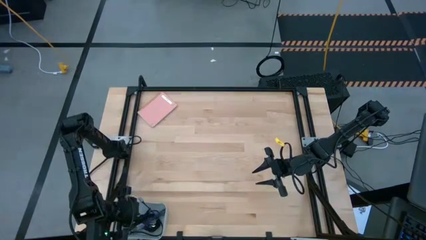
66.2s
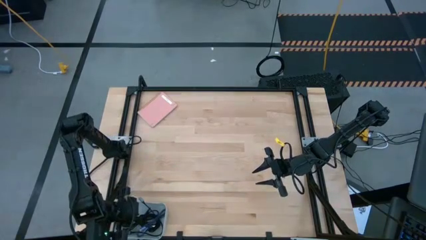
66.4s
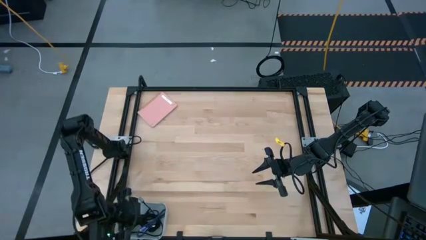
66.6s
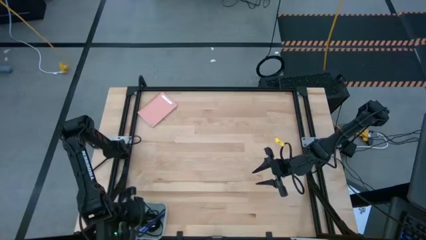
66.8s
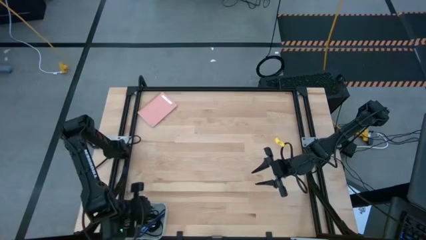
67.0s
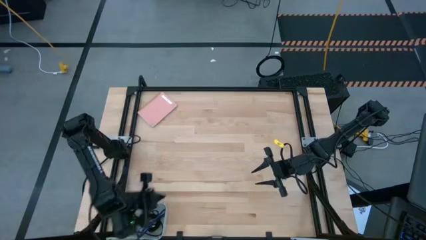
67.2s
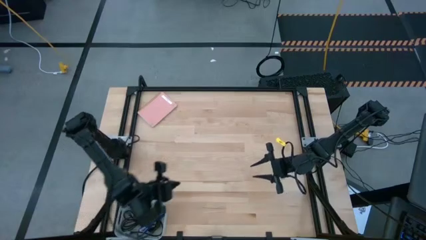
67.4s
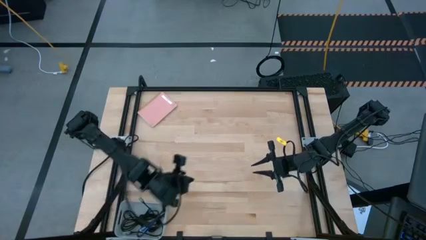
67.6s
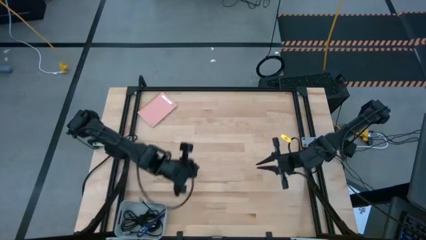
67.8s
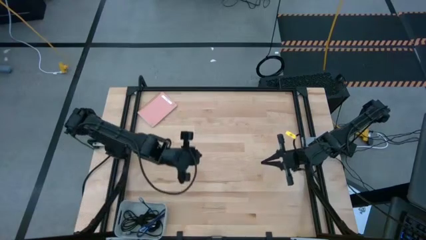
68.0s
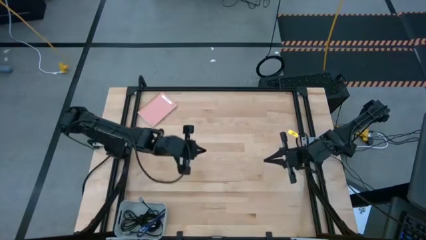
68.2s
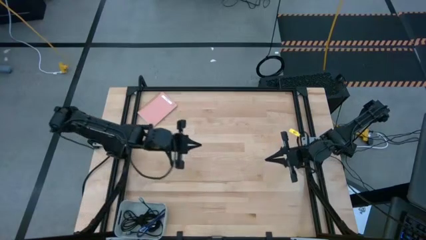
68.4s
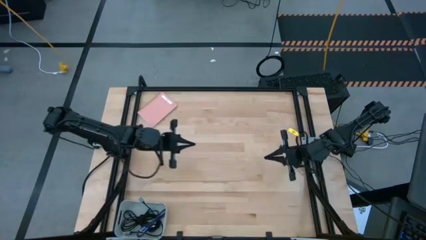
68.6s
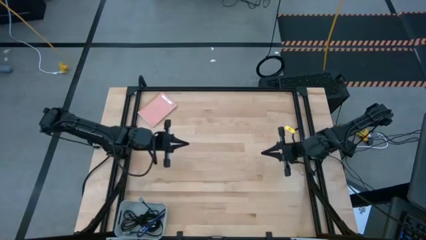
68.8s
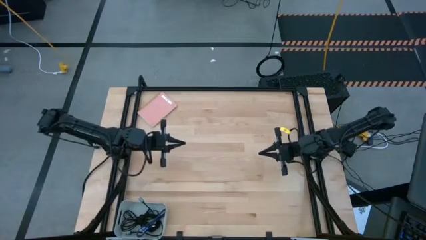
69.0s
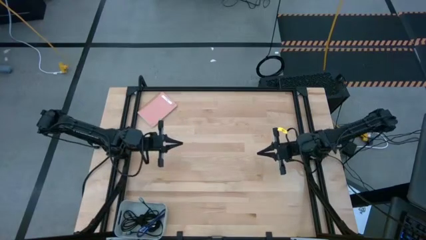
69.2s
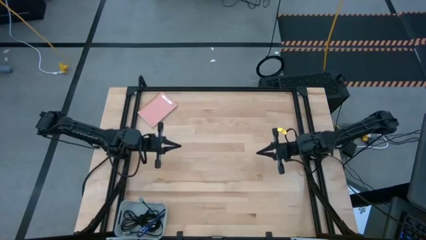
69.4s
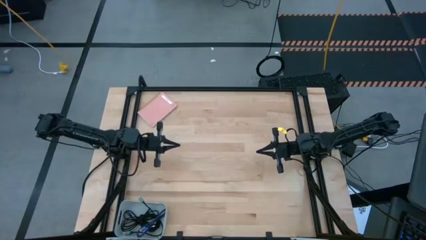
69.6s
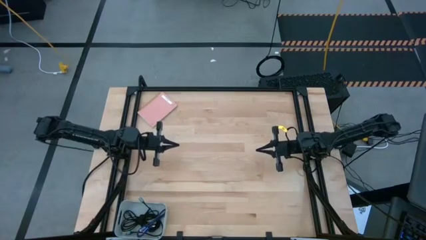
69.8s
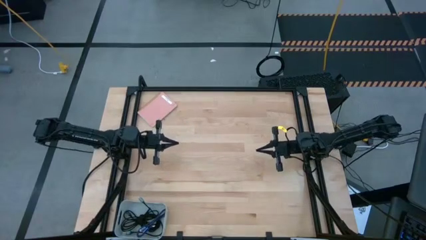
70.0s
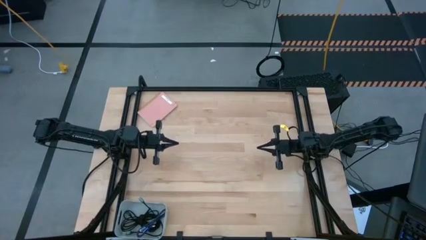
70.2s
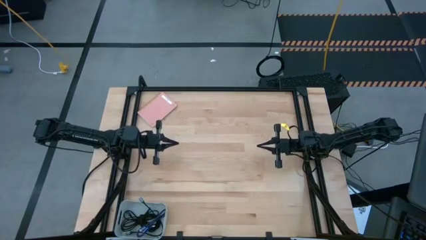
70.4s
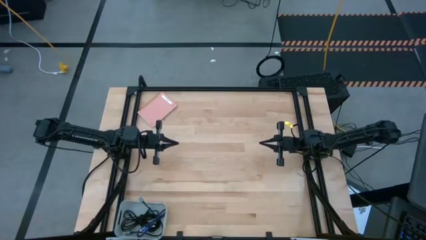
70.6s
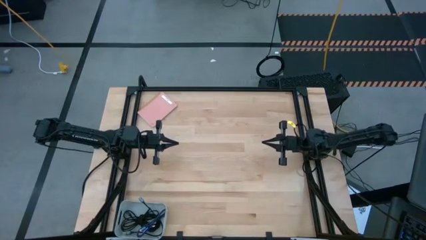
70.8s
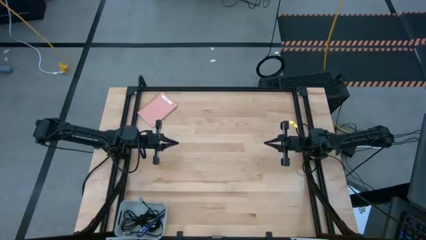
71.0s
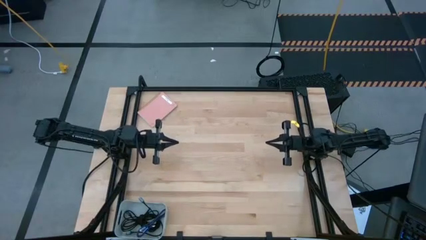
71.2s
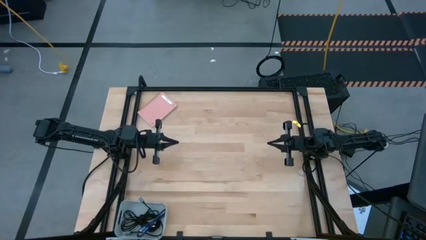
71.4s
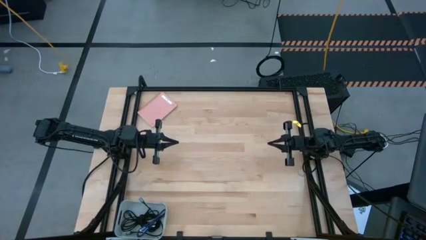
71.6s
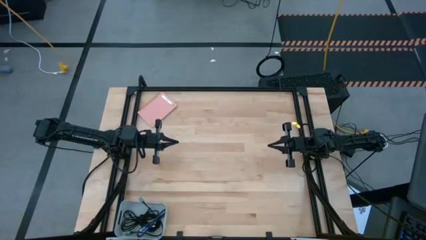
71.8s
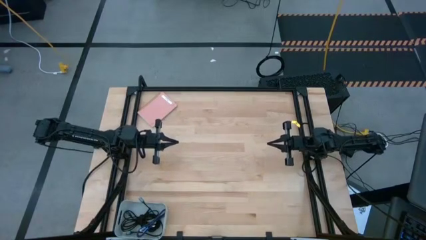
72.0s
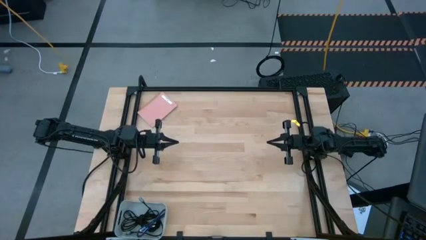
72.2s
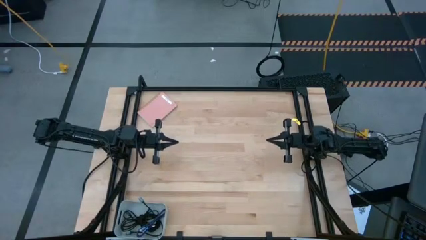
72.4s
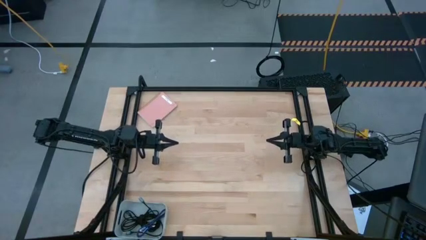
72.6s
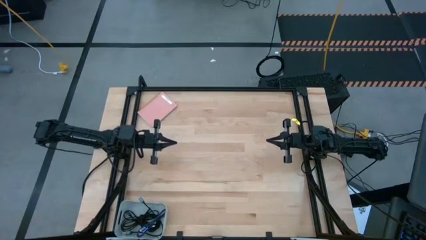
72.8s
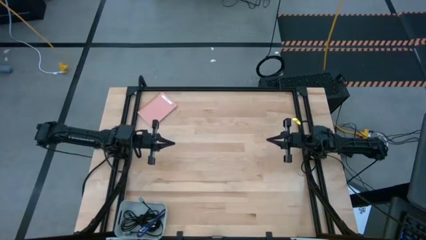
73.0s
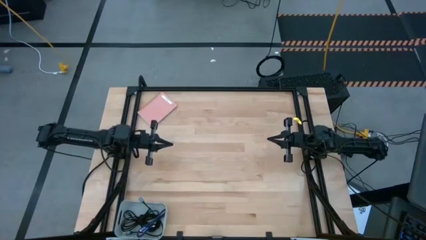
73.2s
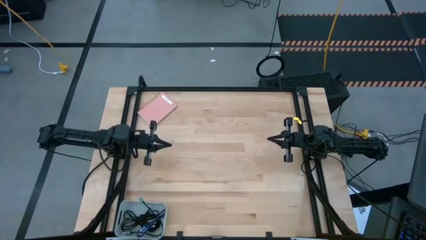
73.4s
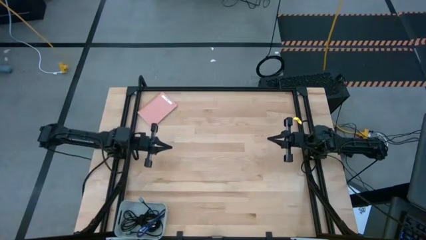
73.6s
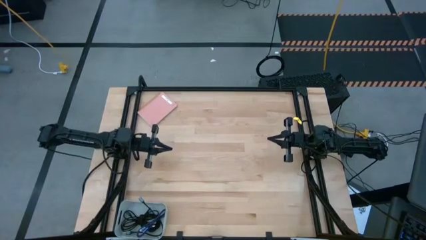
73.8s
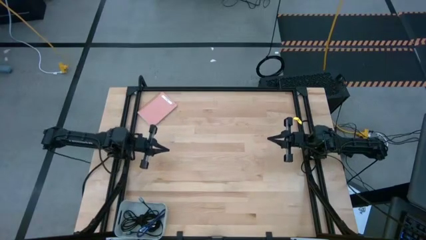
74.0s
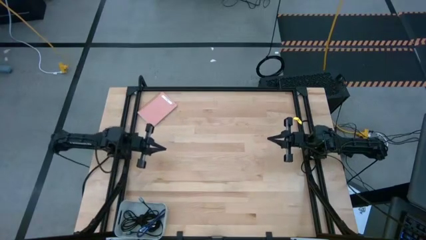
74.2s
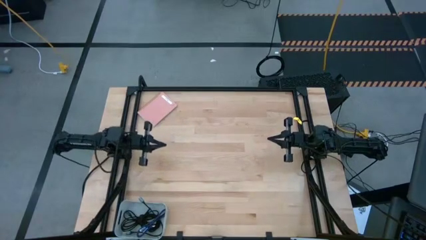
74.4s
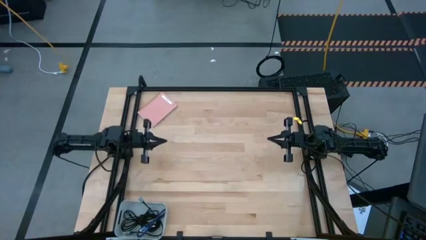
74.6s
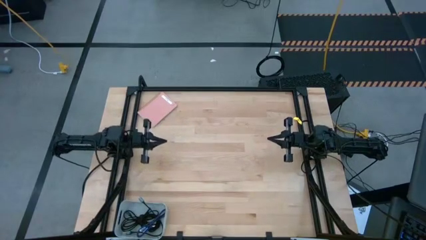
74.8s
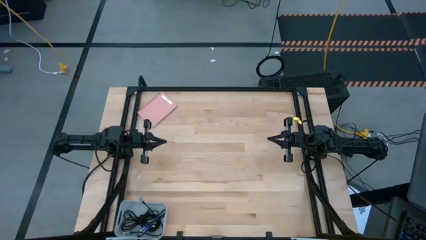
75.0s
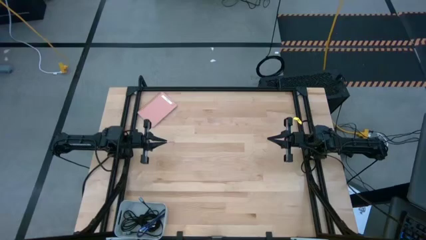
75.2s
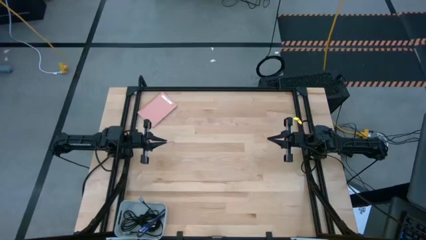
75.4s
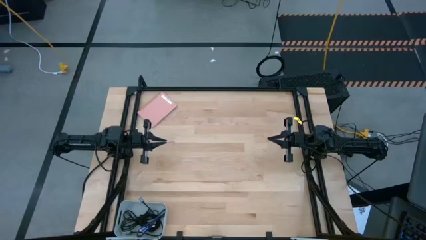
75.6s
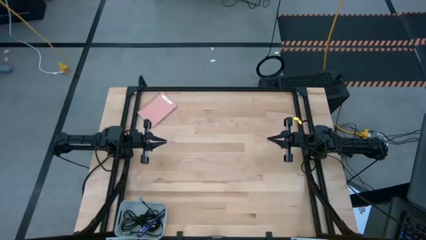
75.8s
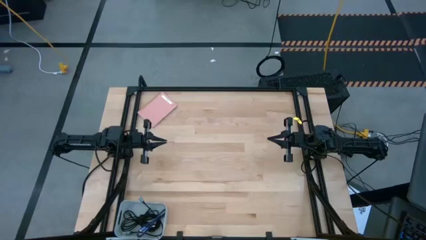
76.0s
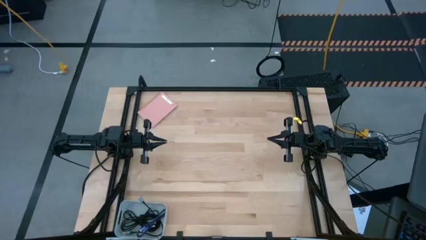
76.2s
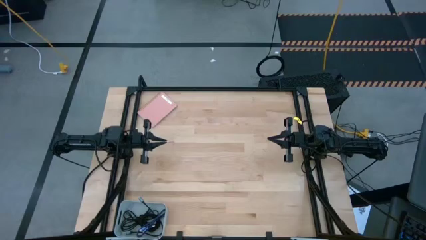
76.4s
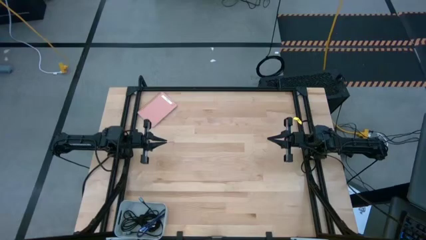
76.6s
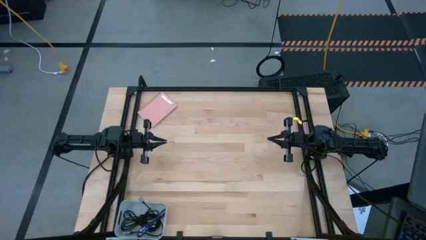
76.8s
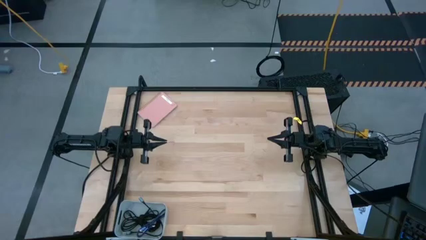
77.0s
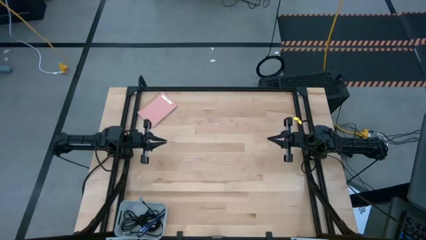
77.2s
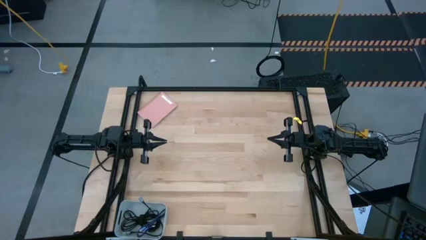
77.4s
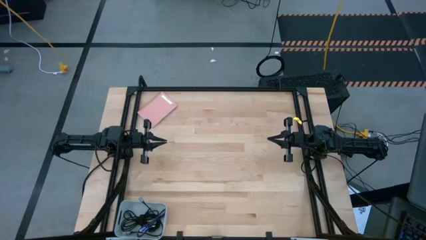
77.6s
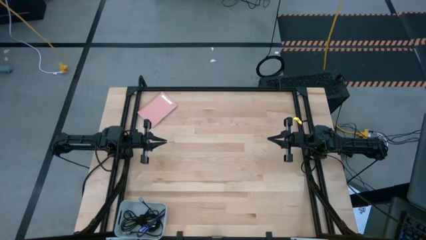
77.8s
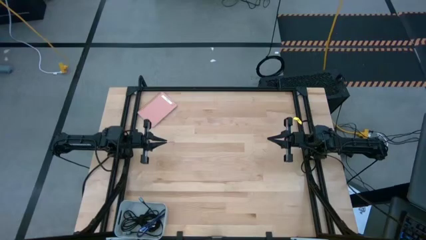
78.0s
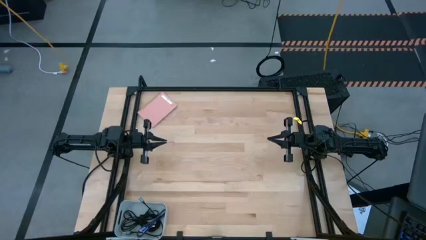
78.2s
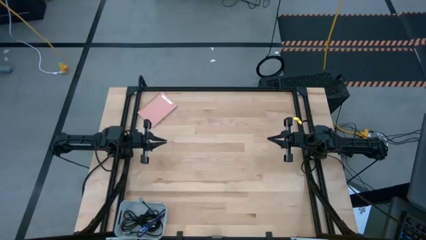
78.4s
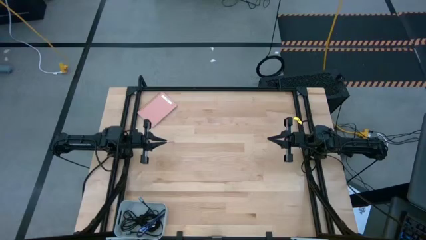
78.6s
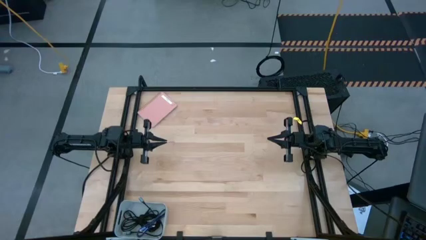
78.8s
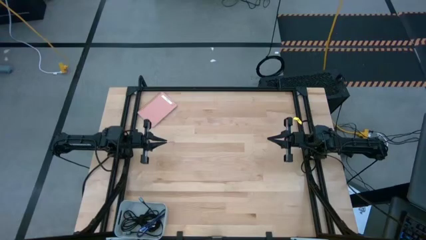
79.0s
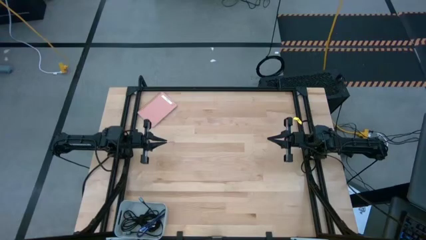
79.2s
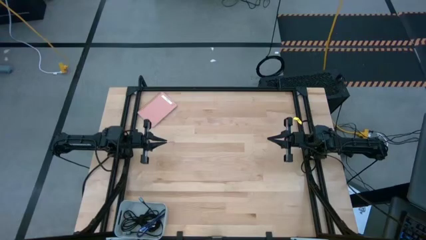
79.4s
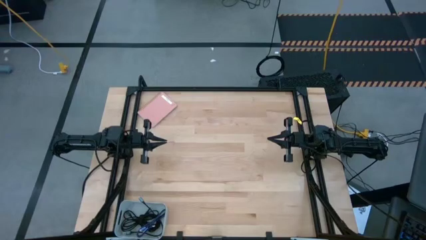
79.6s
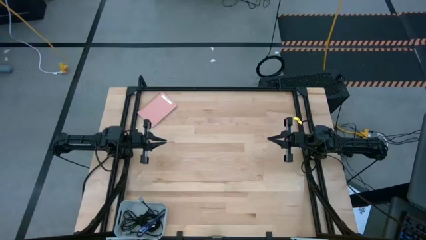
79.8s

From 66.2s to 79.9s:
Task: Pick and place USB-C Cables
Return to Home Position

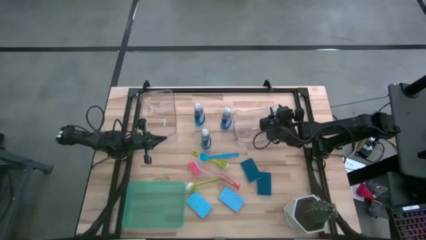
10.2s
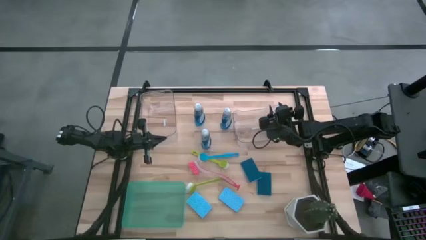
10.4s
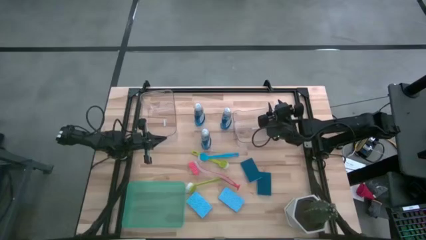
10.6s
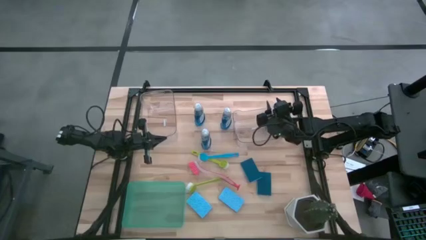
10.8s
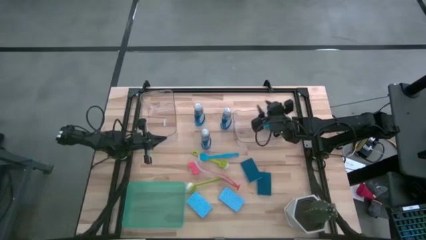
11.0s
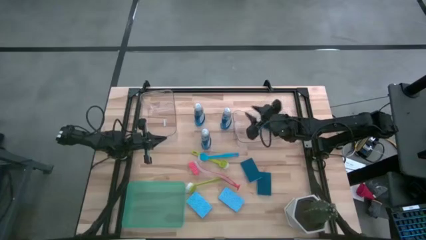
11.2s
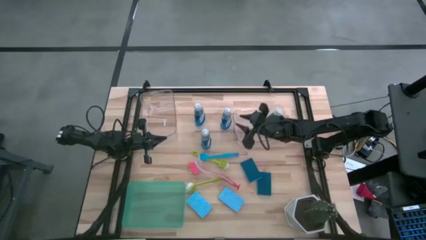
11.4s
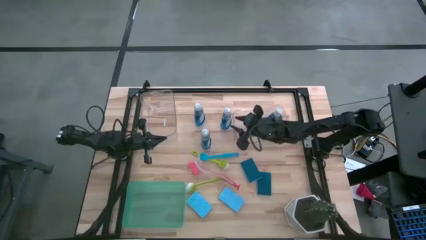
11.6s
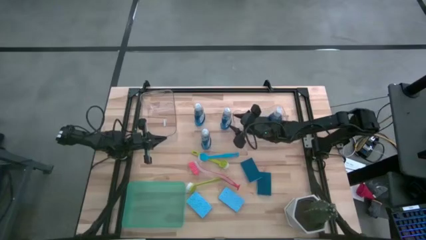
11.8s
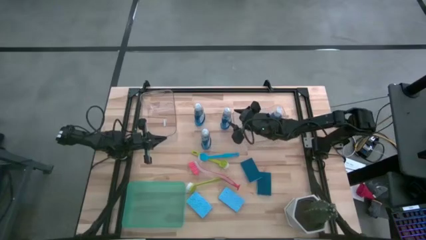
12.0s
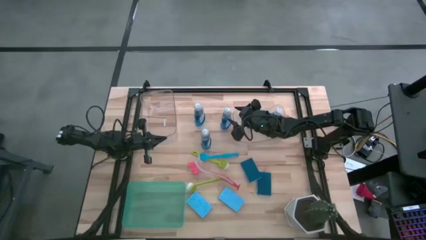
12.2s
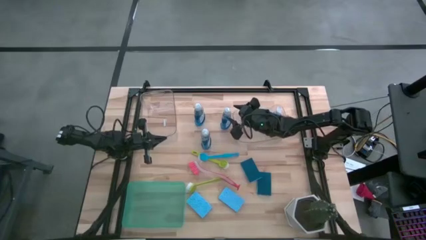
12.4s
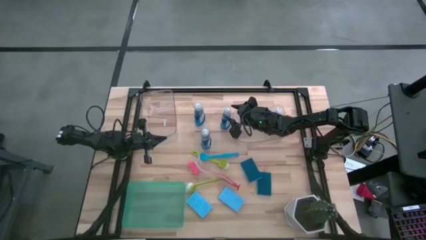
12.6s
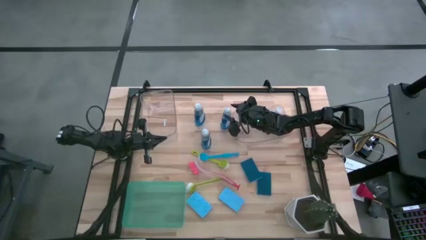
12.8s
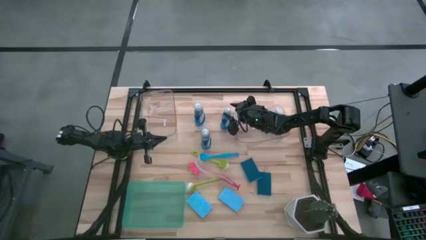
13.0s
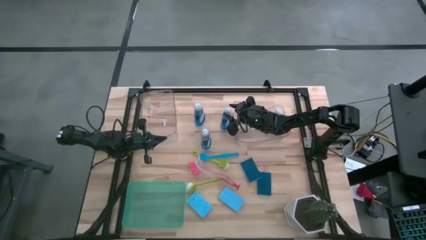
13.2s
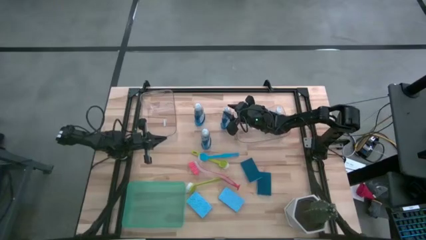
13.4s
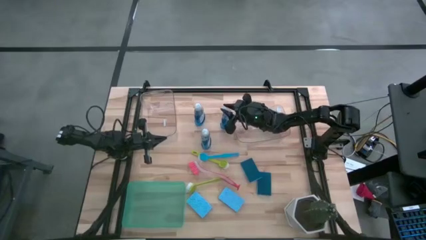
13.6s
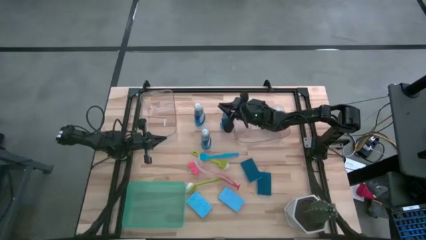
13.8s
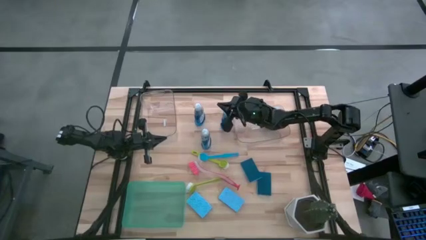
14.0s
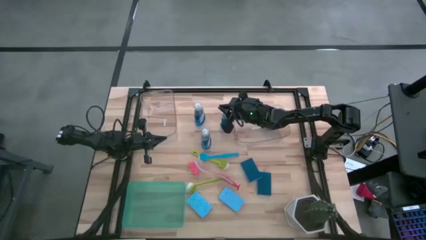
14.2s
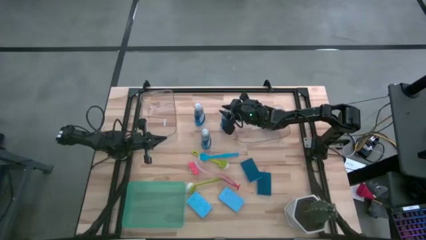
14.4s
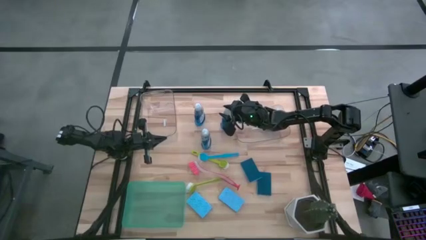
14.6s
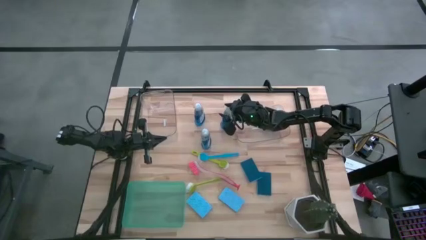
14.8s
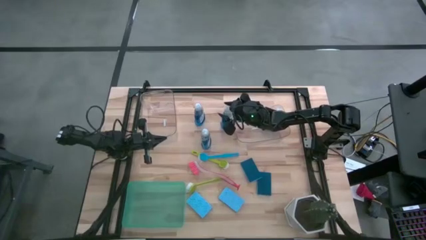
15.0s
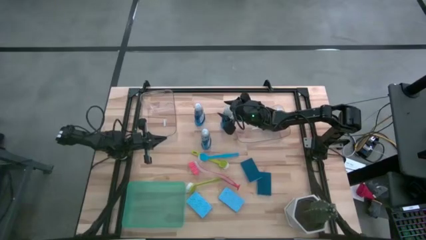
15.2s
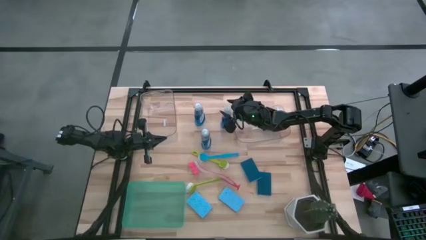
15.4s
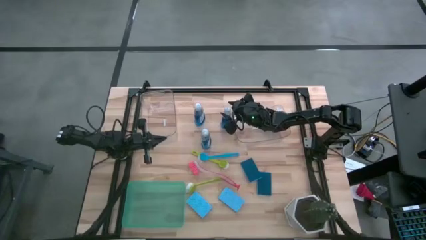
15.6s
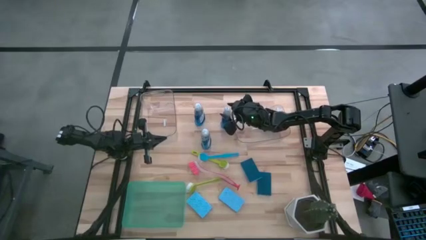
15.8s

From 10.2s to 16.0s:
Task: Pick & Place Kitchen Sink Supplies
Put the soap dispenser into the right transparent bin
